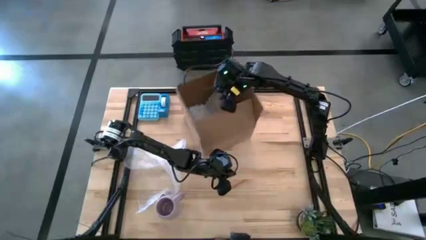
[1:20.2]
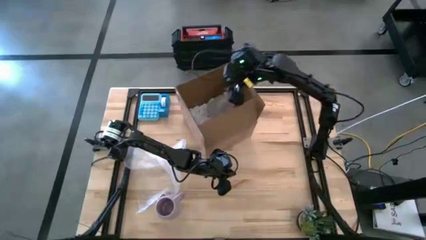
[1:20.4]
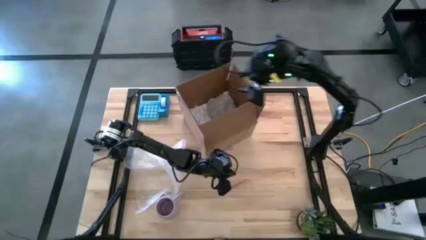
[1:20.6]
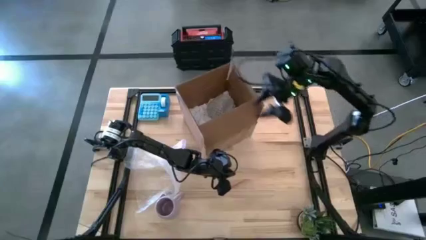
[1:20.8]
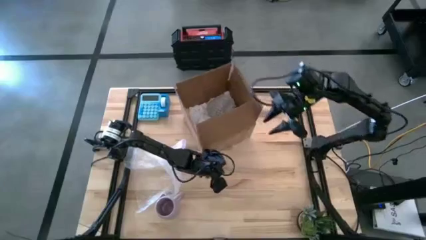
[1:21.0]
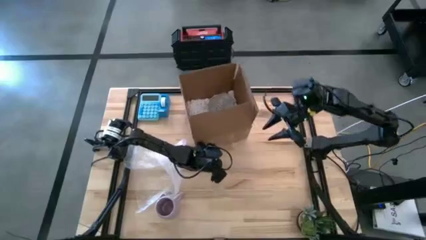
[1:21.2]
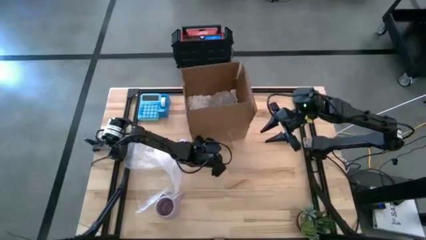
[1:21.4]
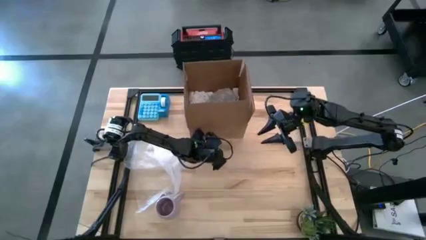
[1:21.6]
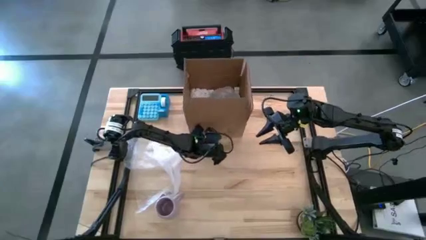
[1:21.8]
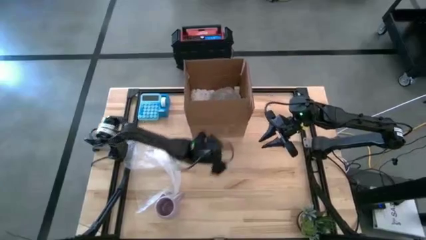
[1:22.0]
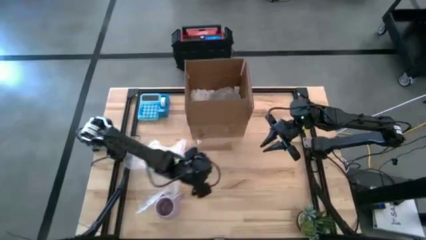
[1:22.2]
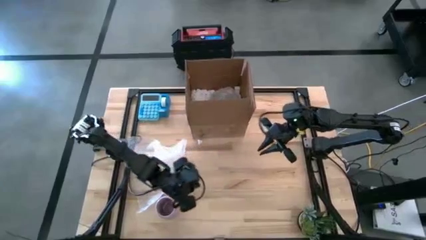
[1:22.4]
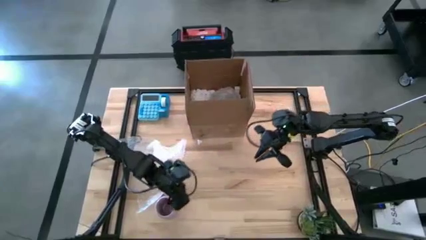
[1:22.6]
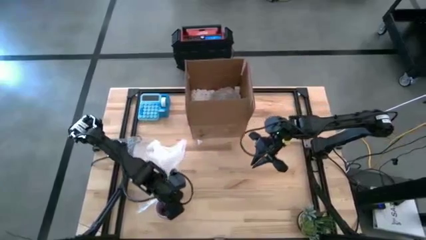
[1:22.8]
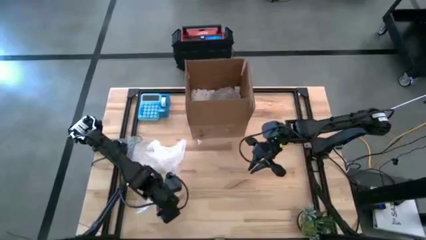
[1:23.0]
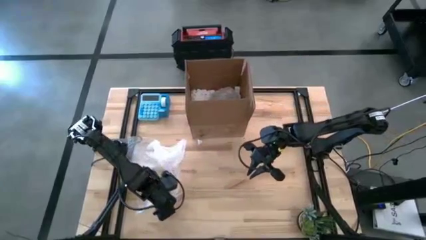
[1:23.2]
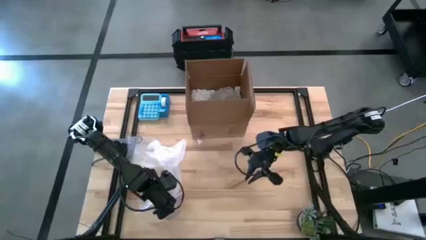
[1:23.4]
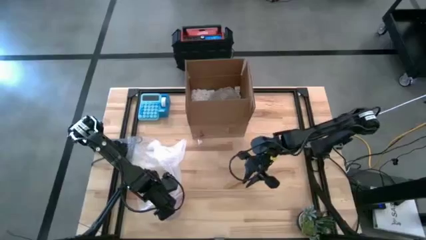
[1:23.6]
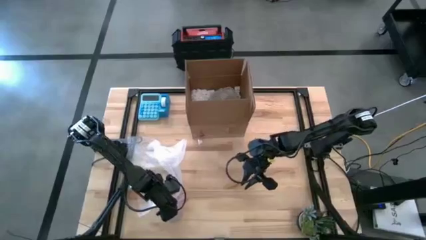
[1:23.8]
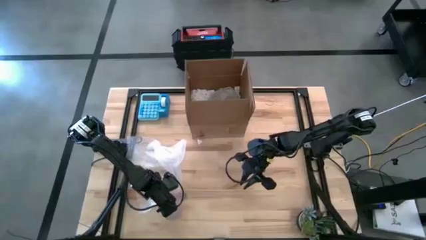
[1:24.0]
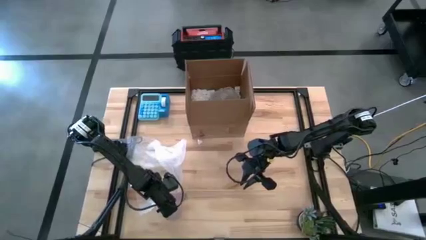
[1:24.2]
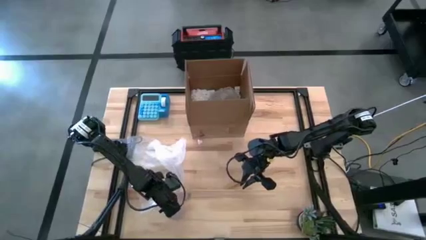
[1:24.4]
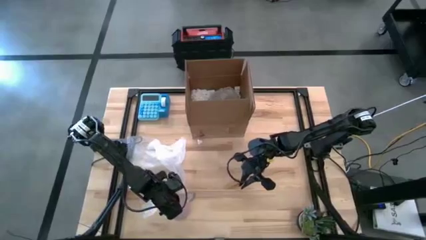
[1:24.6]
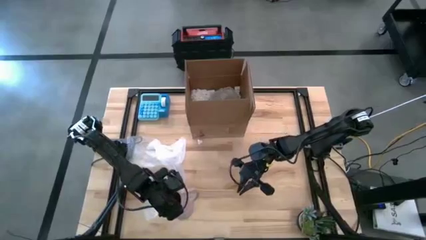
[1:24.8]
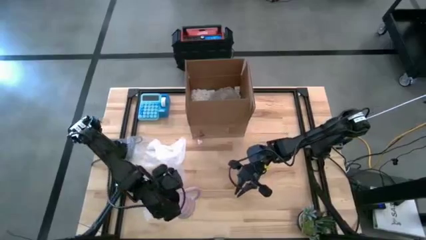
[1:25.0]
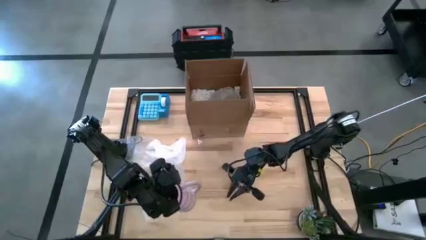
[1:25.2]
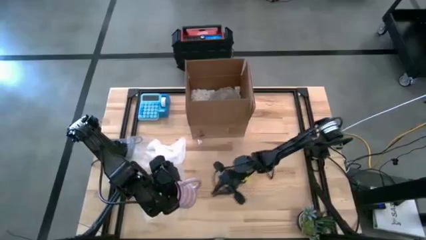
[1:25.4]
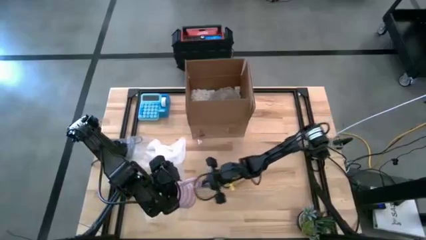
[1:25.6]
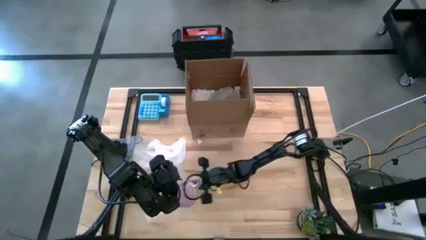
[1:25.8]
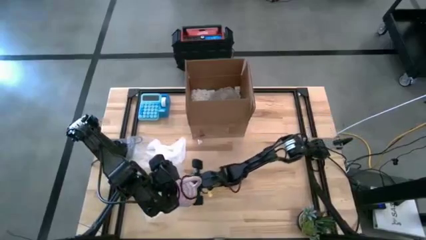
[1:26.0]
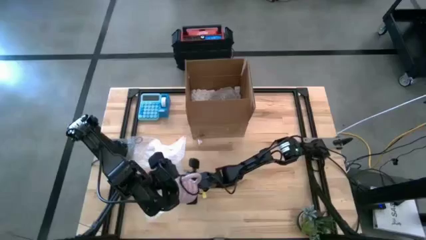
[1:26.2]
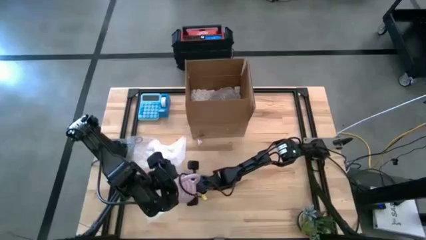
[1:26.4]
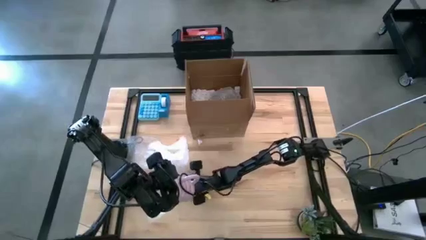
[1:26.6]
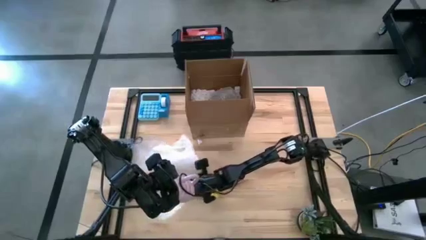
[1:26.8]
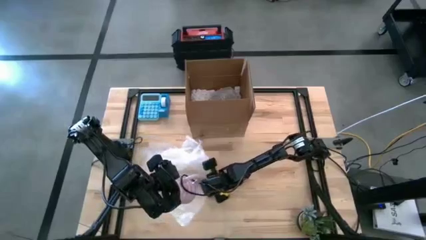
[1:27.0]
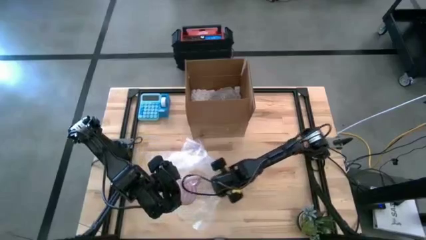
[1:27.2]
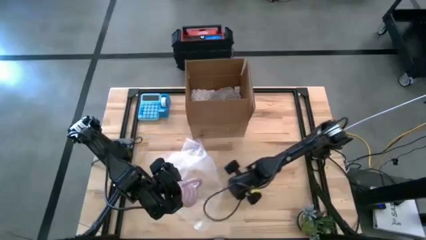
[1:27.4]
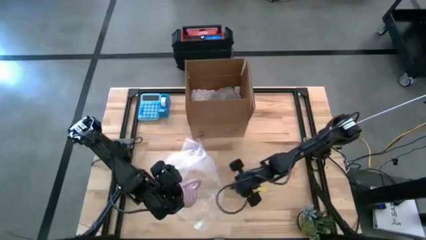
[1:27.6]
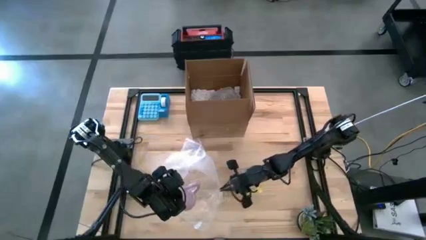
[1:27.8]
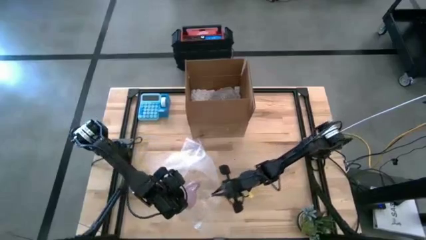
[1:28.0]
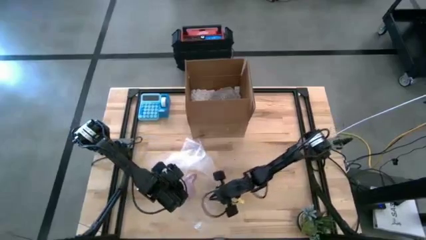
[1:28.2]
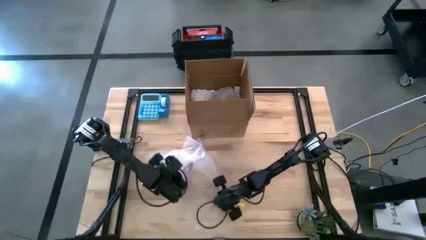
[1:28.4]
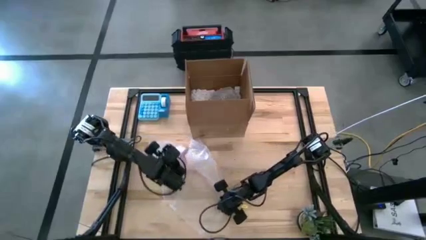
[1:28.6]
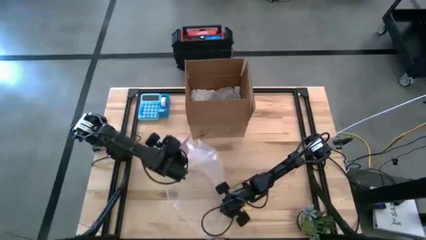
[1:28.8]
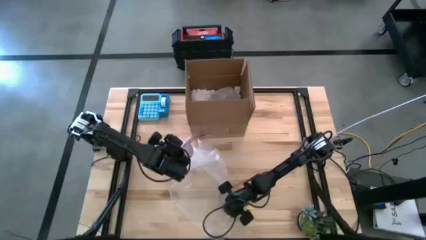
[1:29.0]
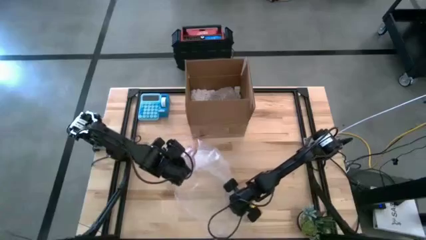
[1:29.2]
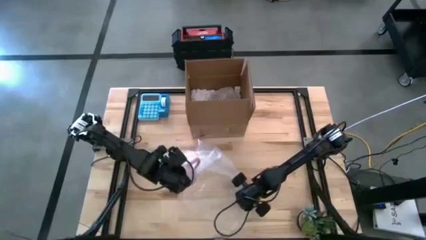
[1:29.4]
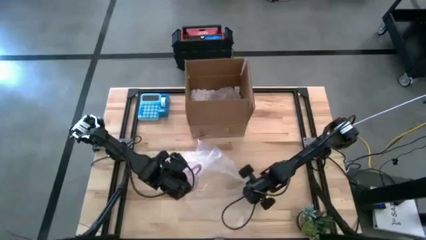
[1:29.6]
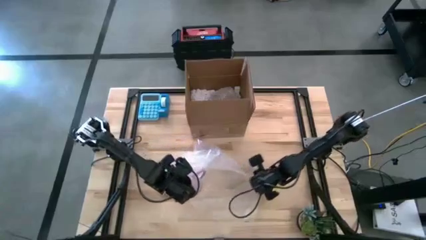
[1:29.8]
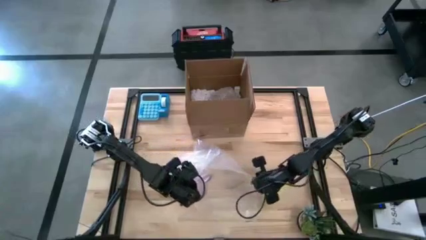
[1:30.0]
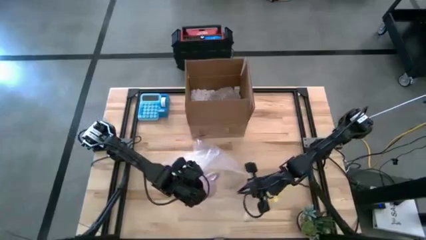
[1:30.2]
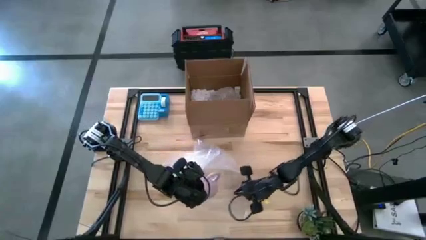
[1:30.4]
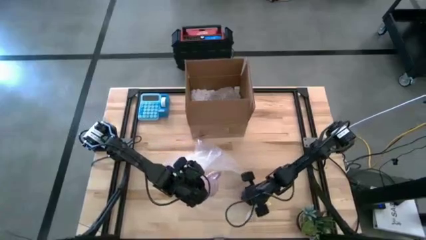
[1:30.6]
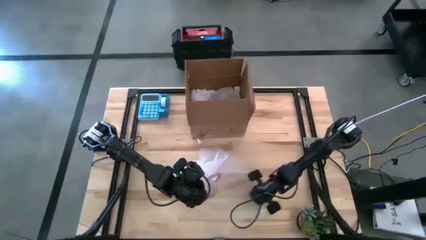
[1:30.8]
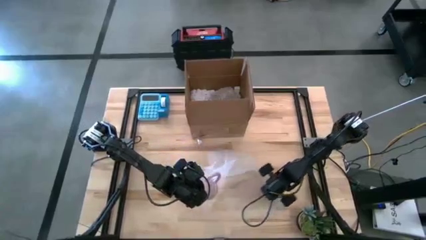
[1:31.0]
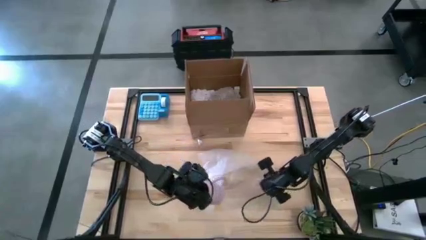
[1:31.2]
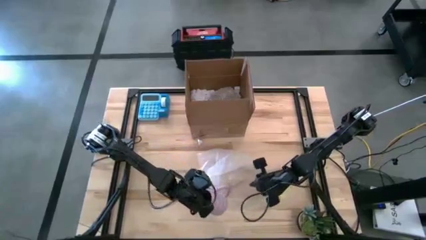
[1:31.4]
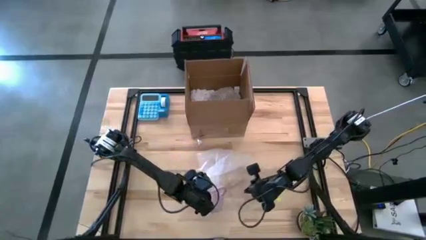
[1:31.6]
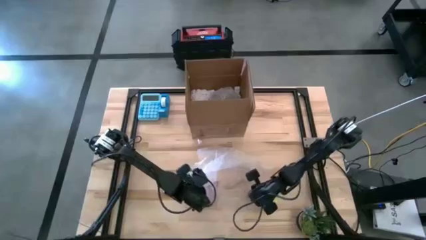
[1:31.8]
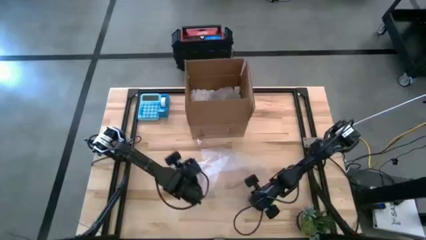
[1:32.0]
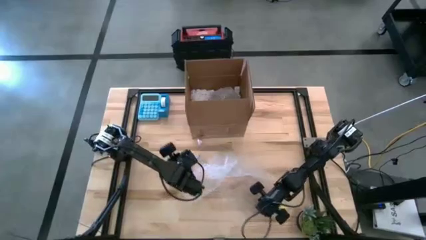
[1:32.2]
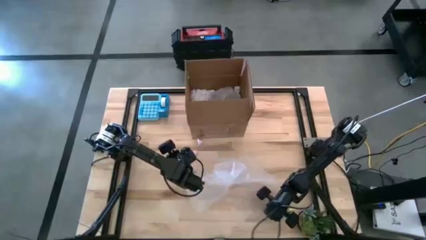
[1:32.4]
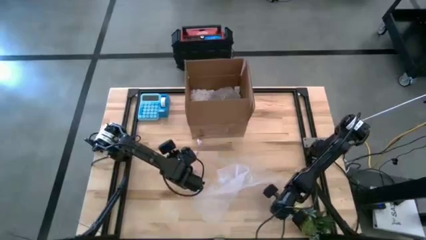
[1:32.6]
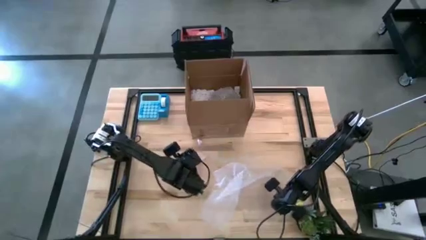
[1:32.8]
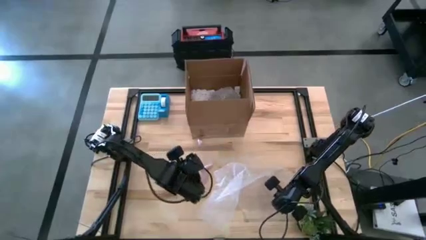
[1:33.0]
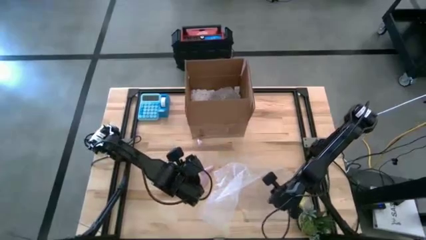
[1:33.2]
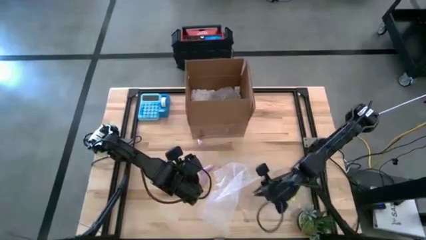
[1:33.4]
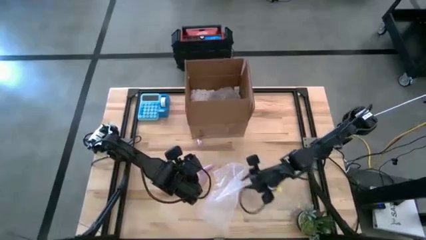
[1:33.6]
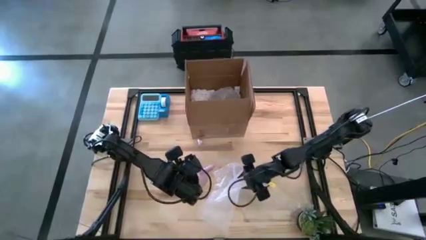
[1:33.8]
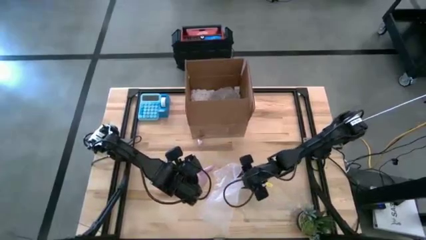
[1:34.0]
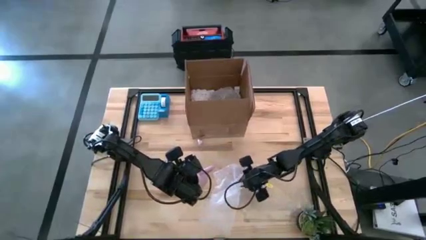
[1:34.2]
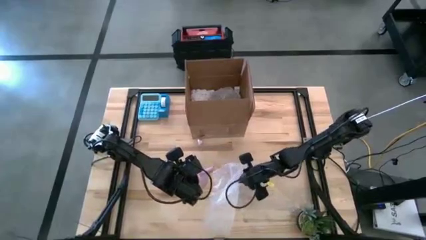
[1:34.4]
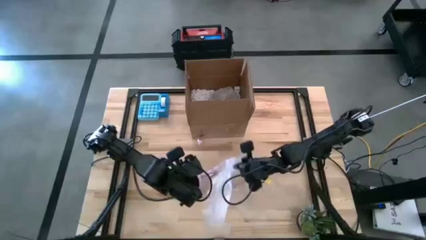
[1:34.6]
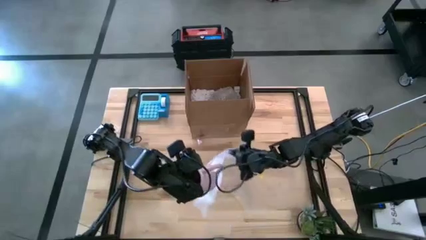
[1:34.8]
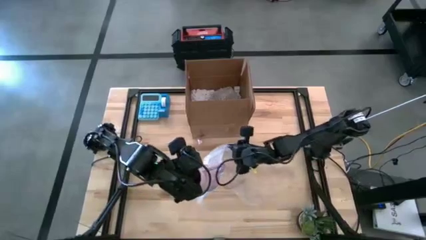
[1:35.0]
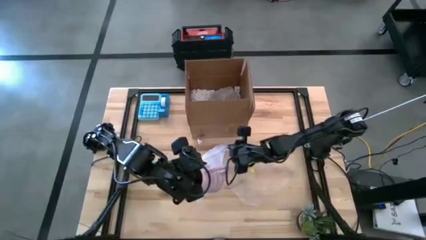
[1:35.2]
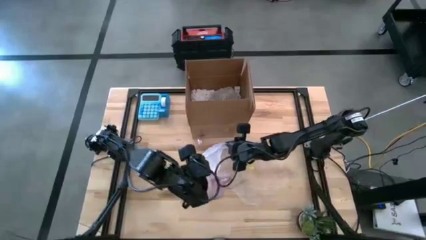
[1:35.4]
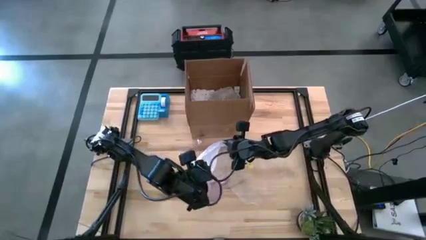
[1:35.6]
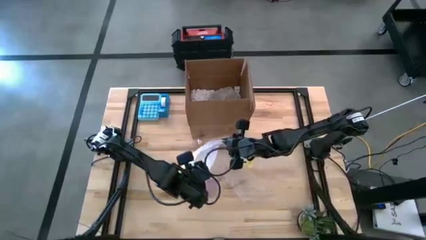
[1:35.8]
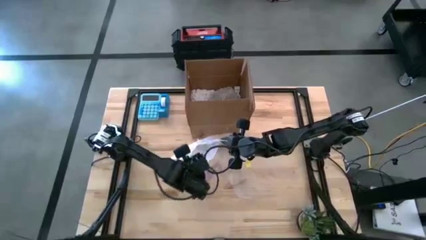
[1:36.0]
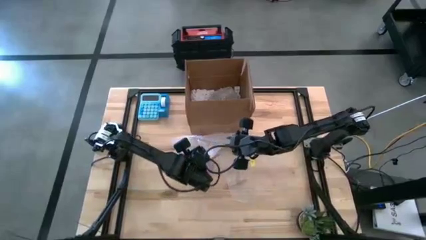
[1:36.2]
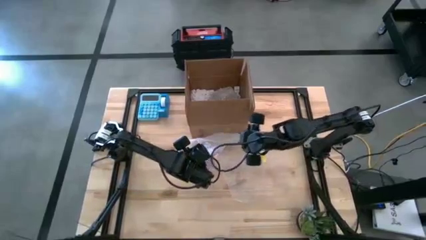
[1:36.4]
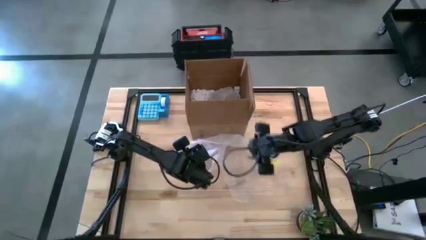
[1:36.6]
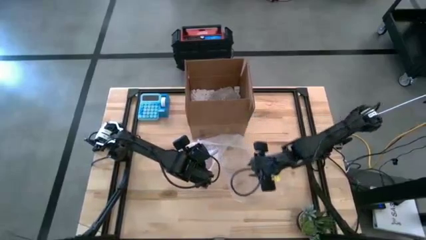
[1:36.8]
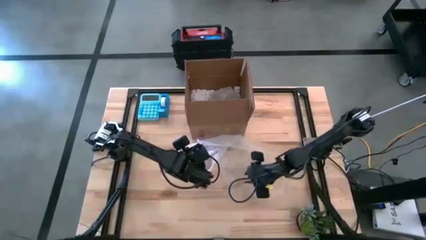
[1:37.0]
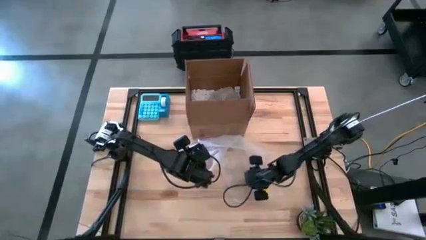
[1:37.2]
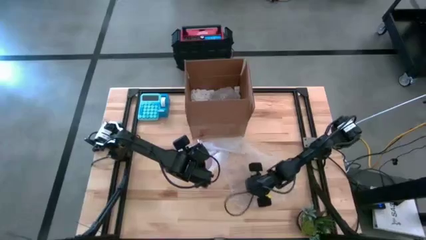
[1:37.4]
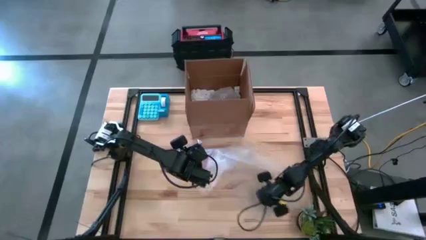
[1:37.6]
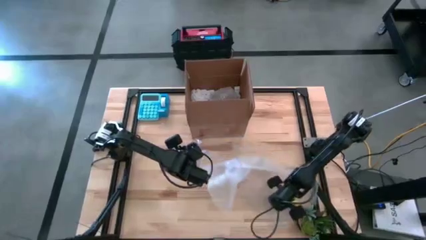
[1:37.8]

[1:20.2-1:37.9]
Task: wrap mug
Wrap the purple mug with bubble wrap
